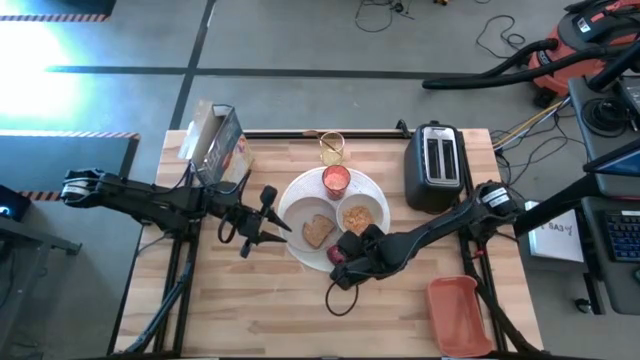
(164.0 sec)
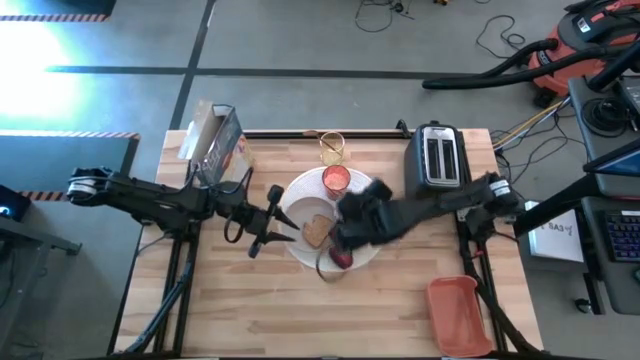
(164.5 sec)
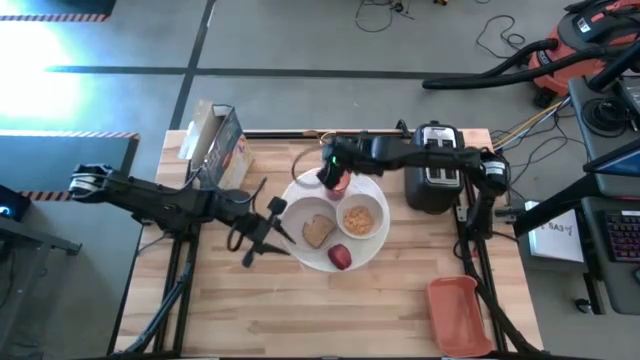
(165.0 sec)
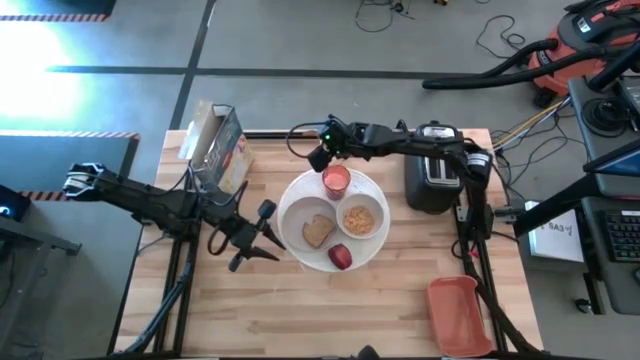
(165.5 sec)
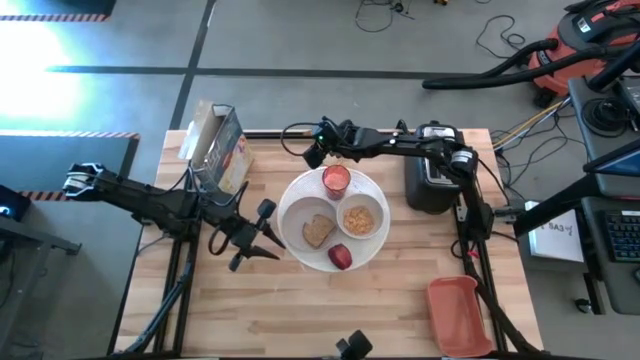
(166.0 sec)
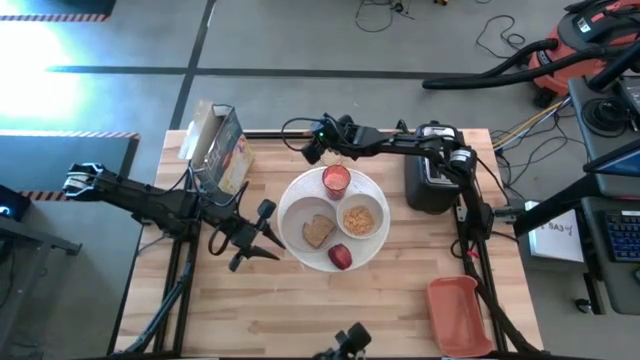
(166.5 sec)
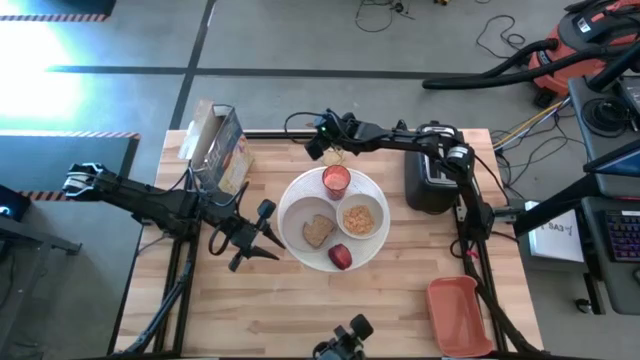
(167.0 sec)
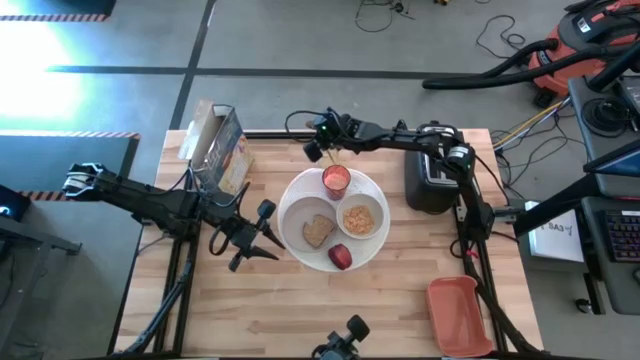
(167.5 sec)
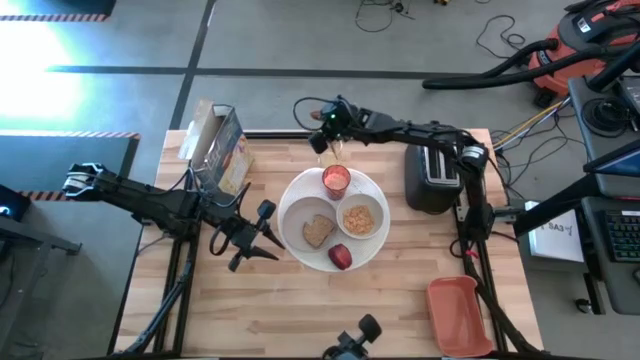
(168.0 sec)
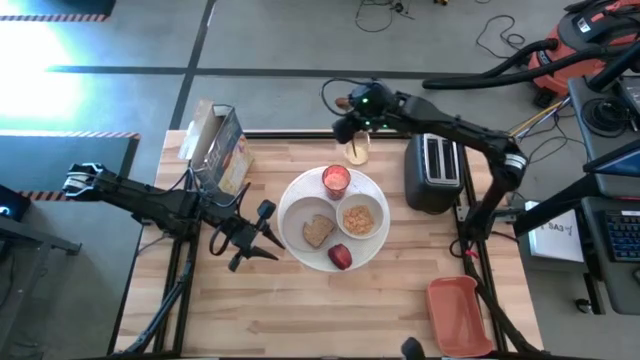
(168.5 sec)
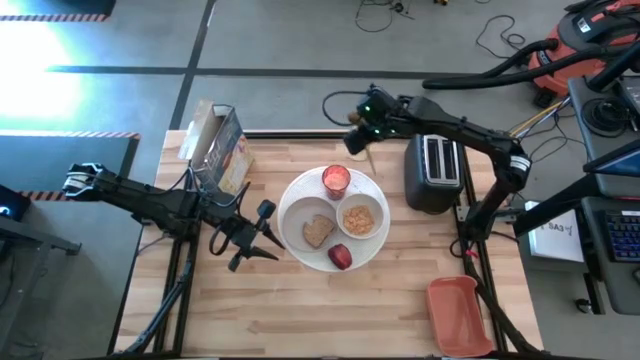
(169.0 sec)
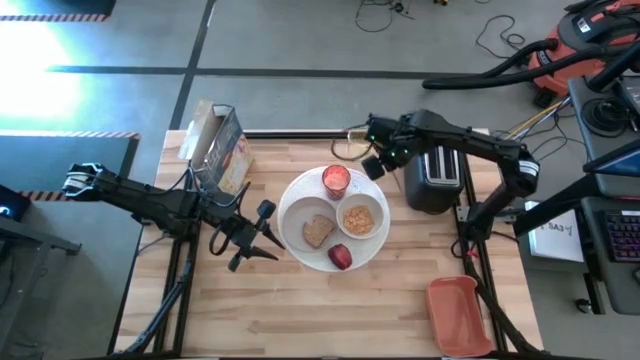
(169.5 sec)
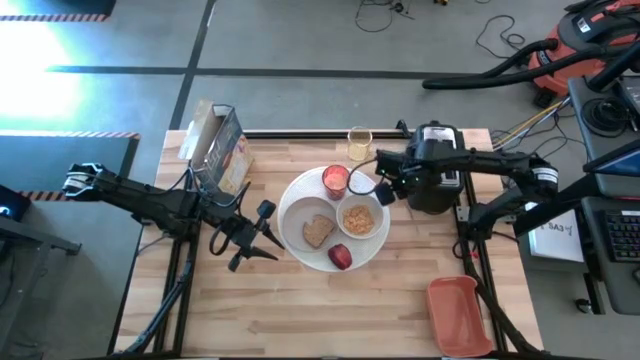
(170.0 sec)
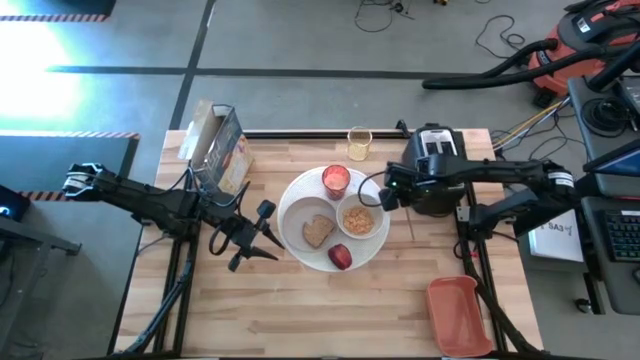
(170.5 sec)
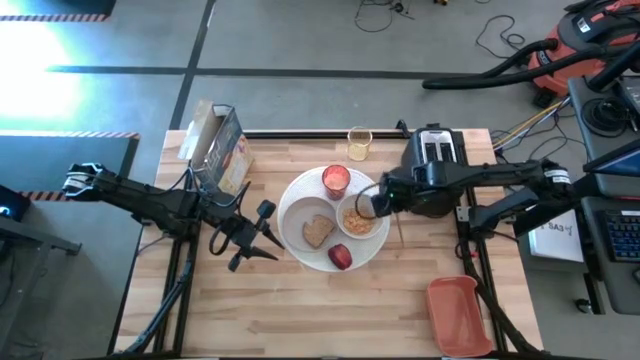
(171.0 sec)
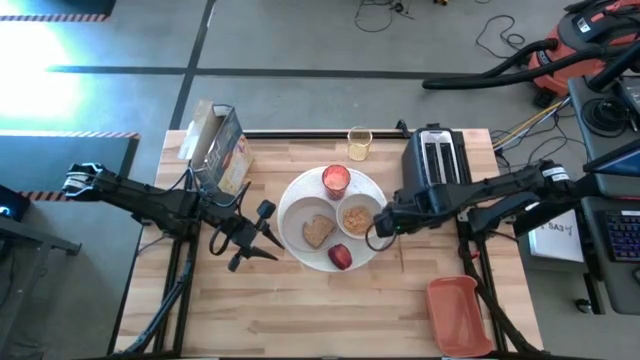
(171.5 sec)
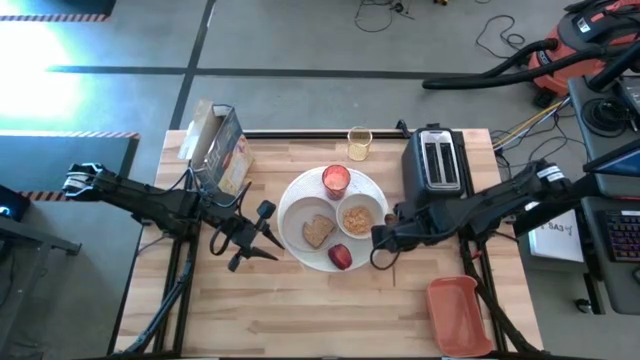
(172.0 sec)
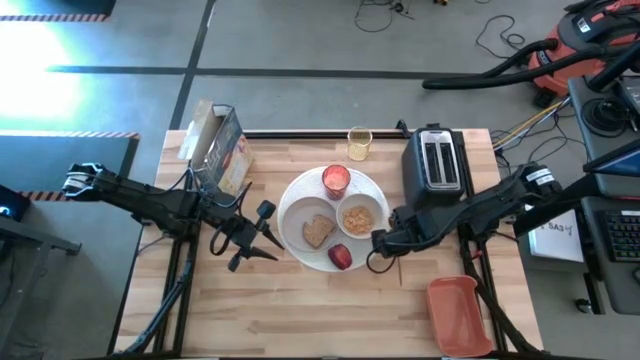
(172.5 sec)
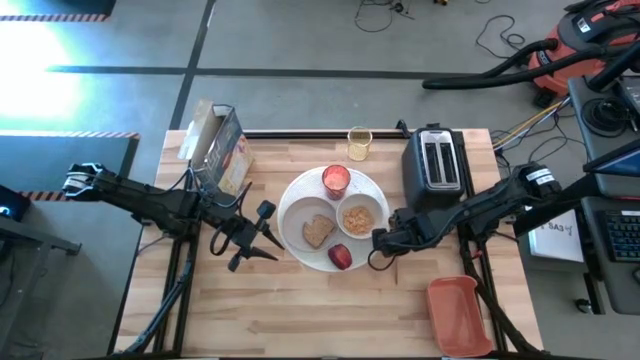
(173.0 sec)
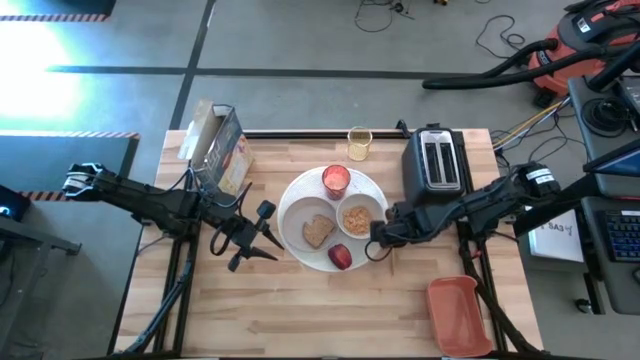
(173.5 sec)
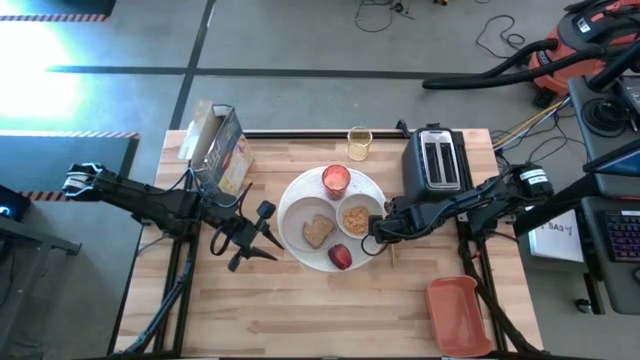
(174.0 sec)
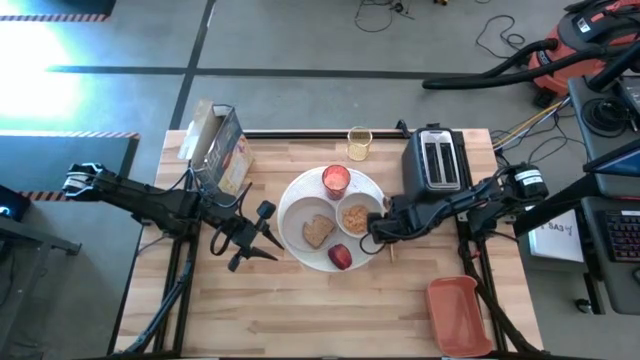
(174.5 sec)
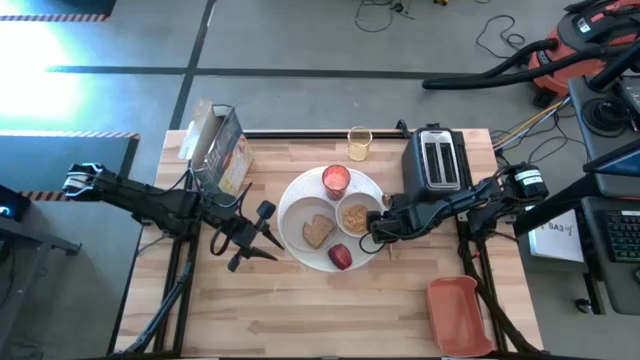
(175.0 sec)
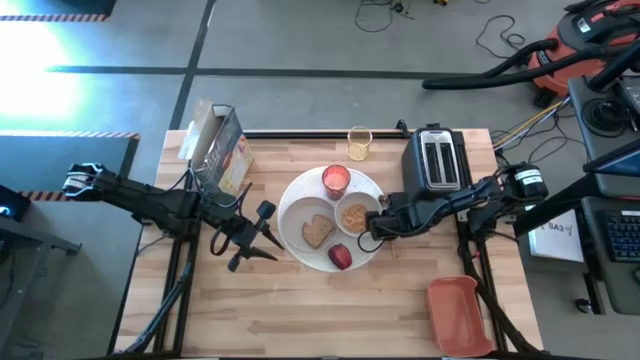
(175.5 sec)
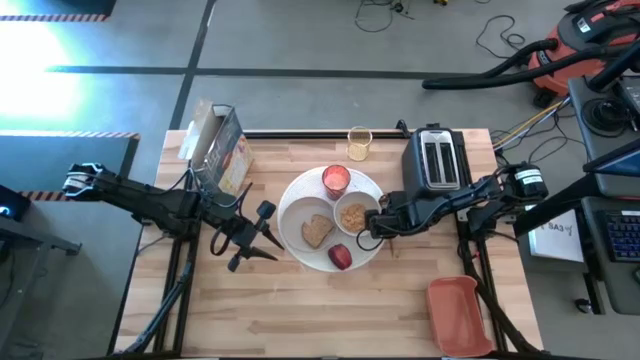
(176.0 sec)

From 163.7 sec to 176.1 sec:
Task: Arrange a breakfast setting
Put the spoon on the right side of the placemat

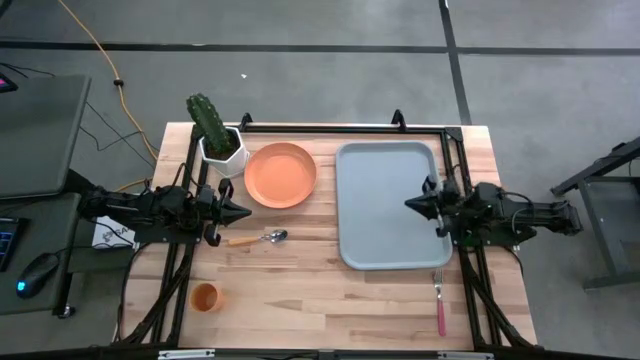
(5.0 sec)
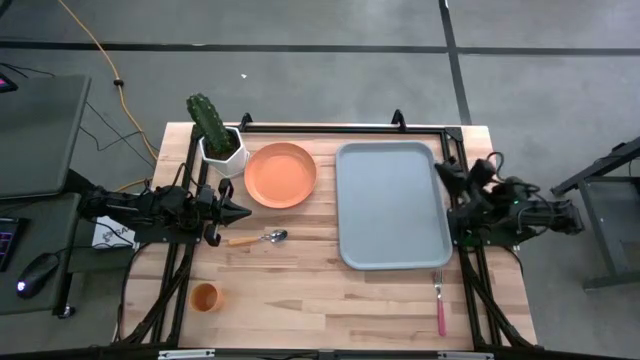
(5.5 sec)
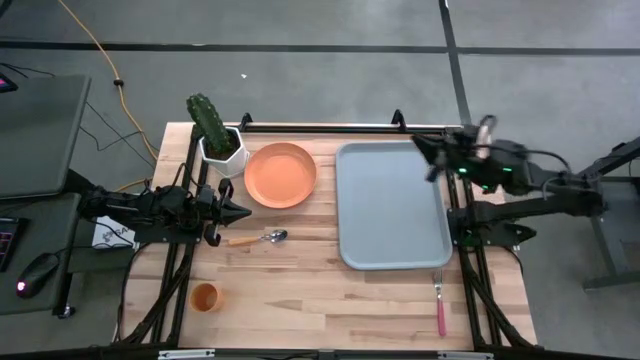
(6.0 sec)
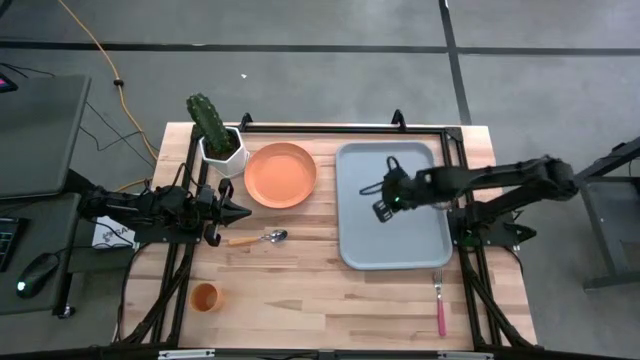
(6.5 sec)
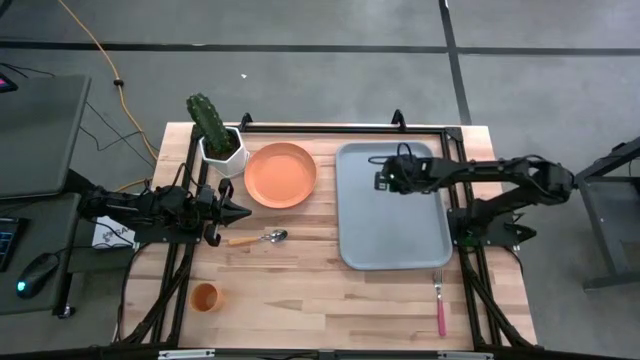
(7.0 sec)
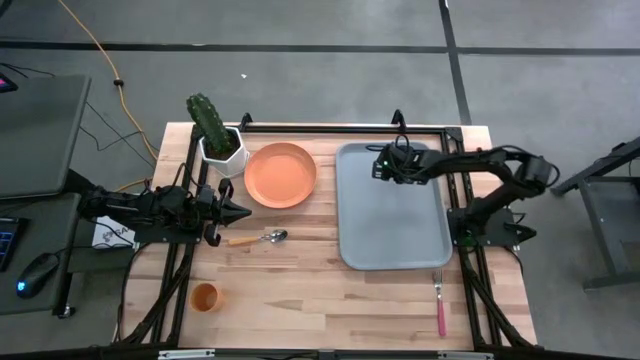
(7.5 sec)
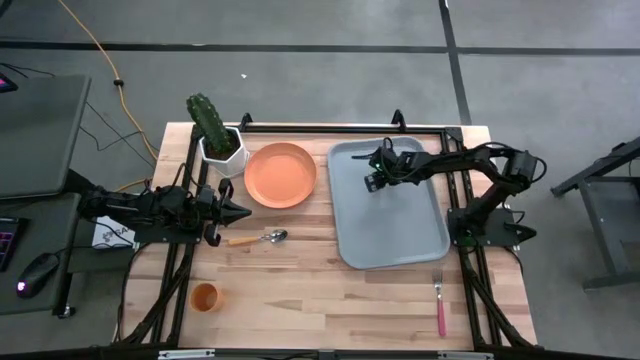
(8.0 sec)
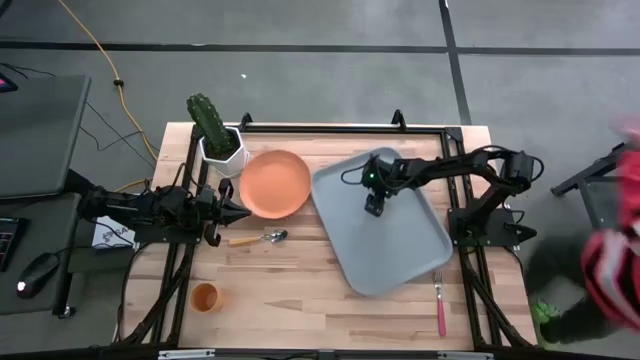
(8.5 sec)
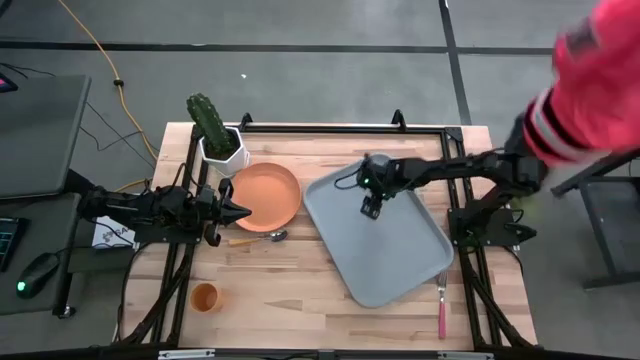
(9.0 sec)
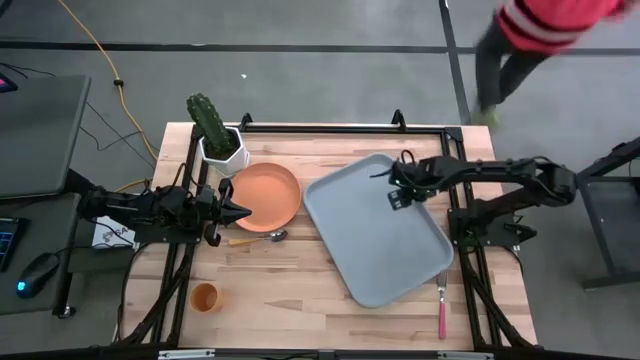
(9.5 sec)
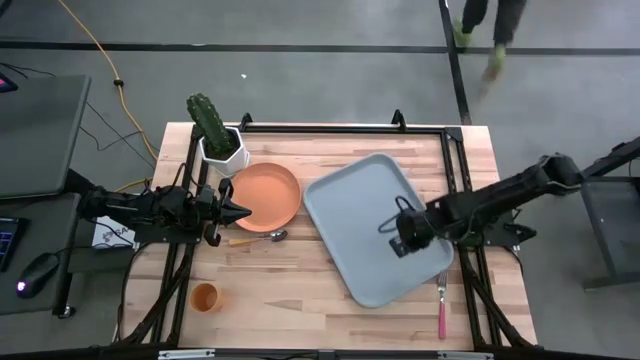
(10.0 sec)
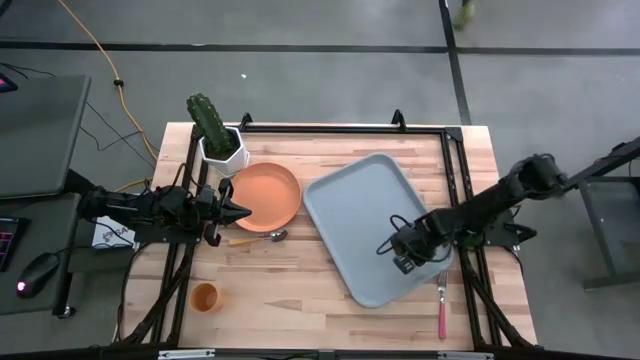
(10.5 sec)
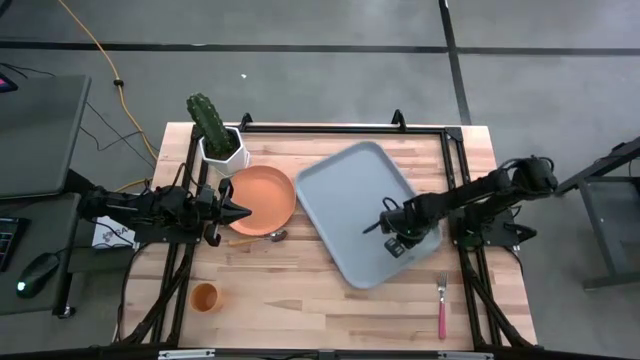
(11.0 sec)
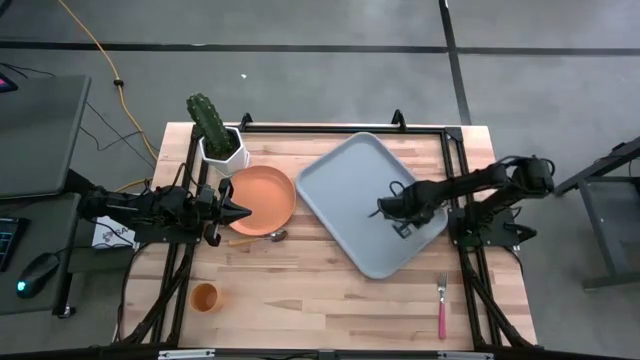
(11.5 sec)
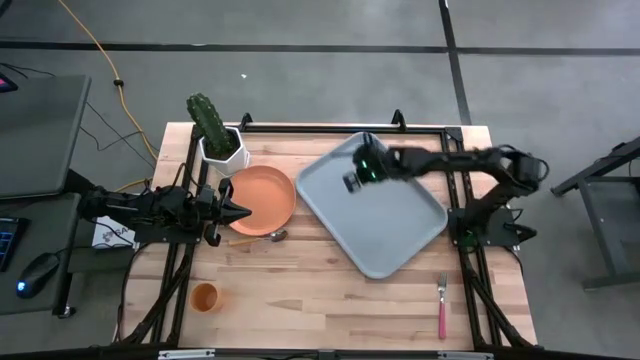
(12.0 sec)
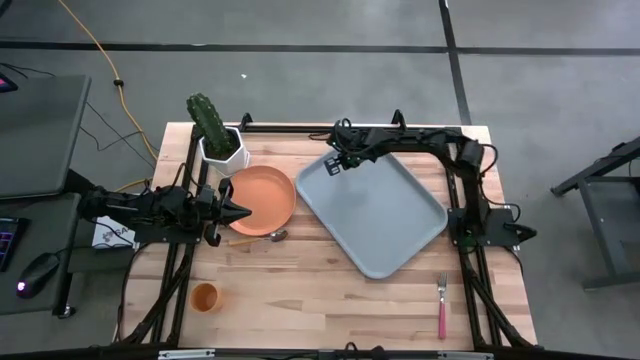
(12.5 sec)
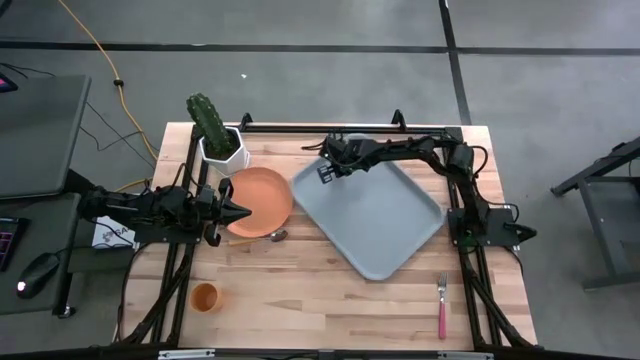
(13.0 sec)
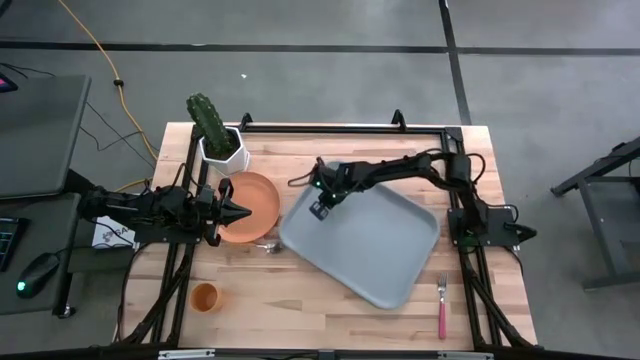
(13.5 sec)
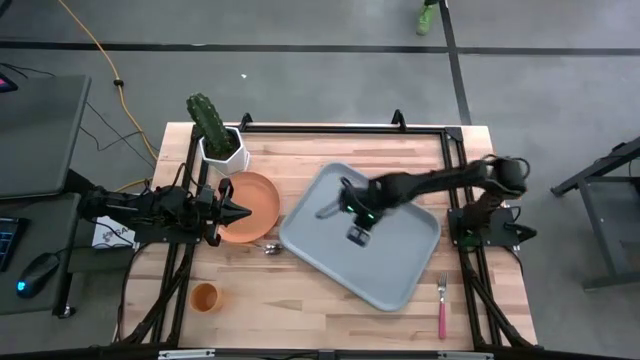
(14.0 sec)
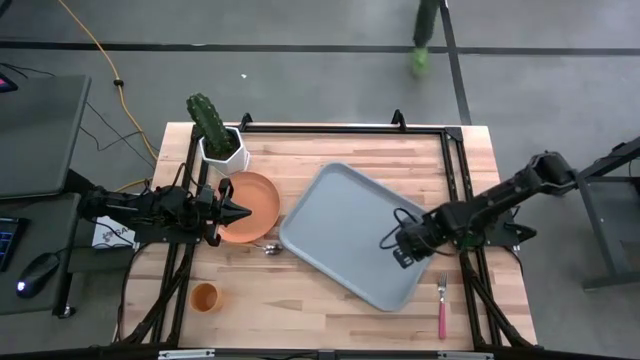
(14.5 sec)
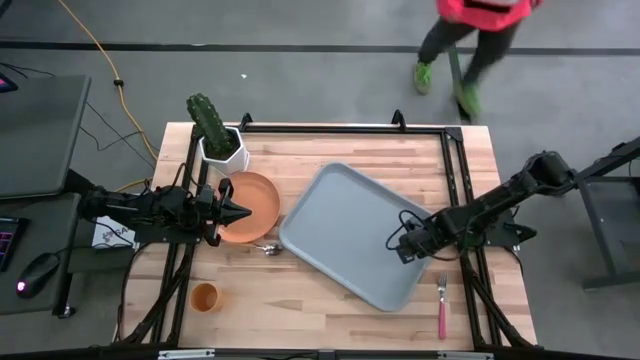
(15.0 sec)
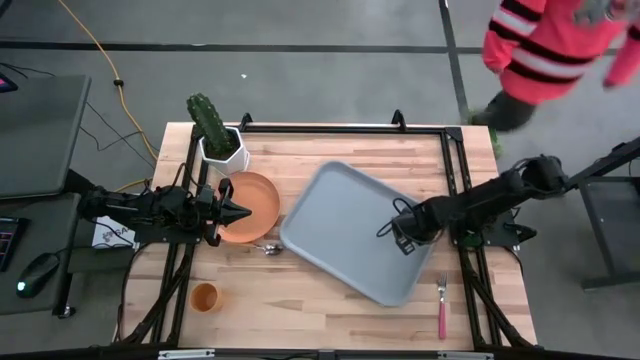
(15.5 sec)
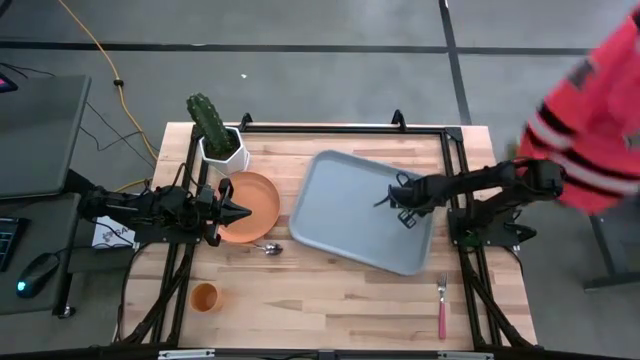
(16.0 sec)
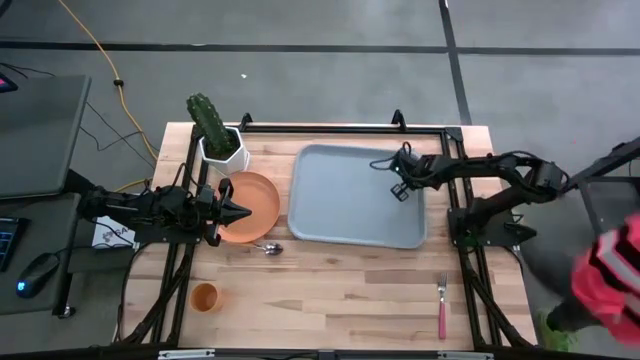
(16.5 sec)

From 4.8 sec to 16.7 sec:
Task: Pick and place plate/cup/fork/spoon on tray
Adjust the gray serving tray
